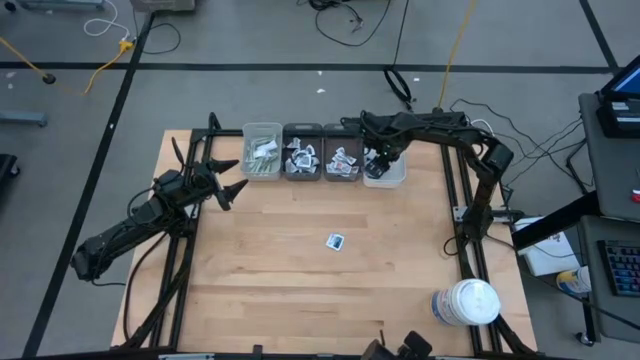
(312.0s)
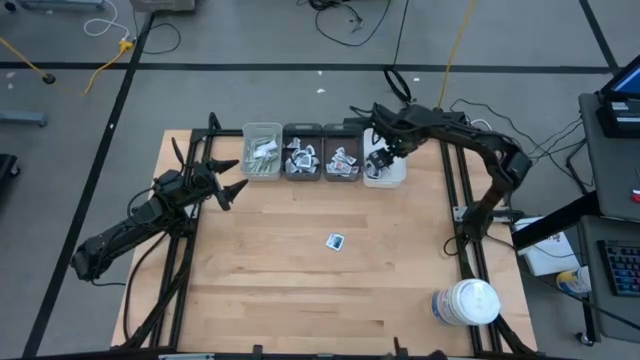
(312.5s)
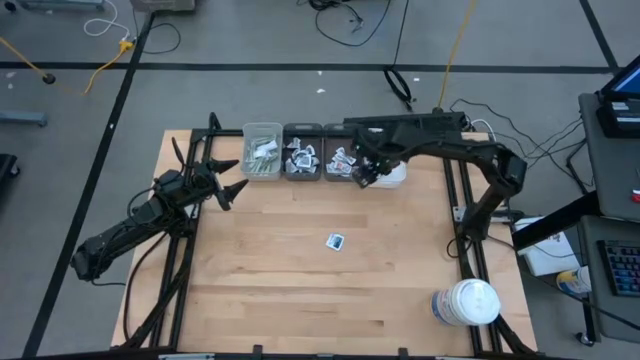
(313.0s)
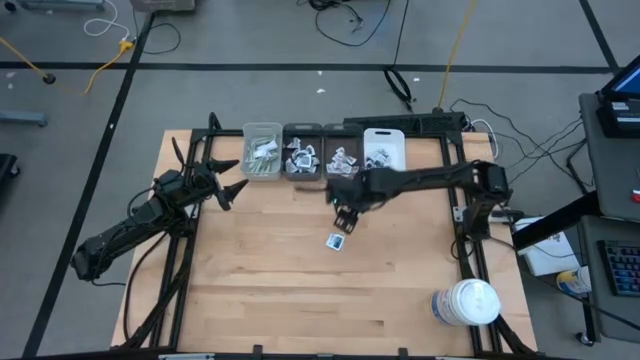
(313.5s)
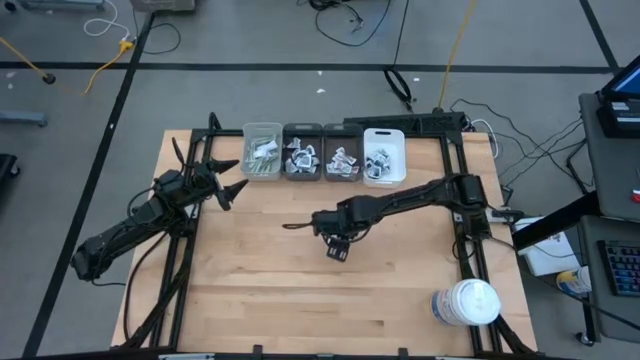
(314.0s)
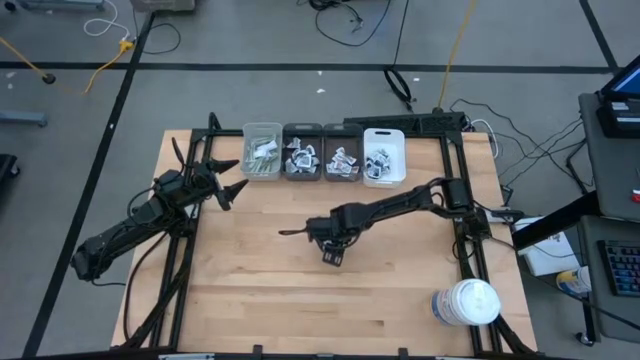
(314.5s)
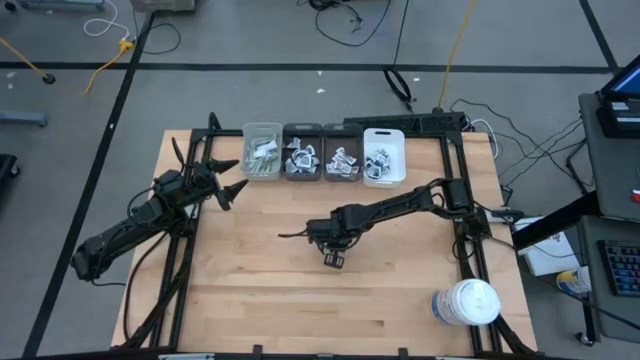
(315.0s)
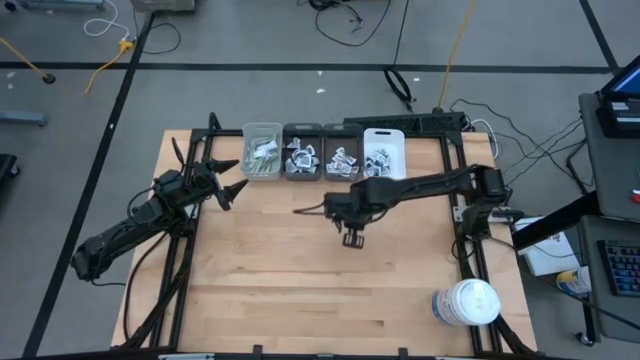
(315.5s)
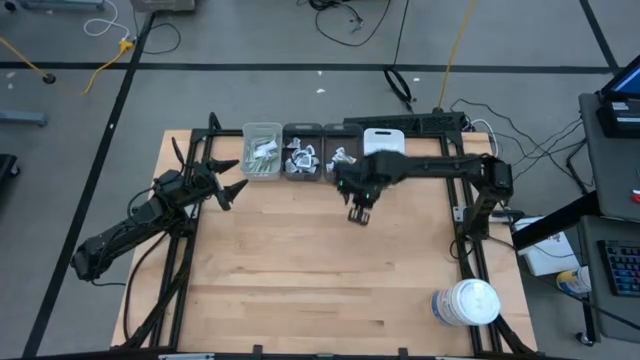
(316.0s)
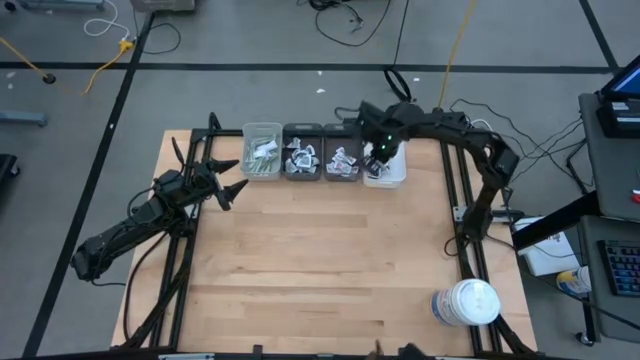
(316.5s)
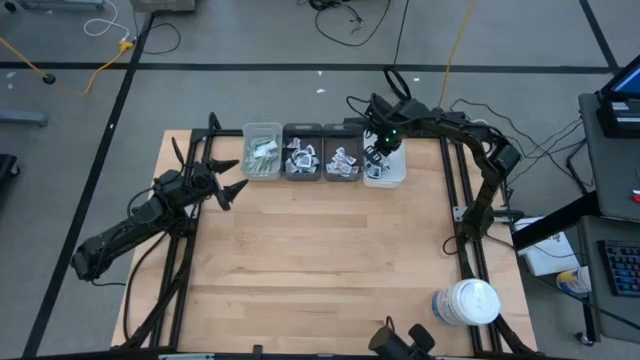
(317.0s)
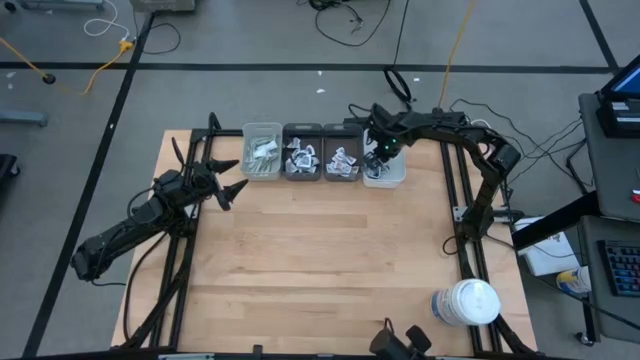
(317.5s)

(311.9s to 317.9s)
Task: Pick & Place First Aid Supplies
Put the alcohol pad into the white bin

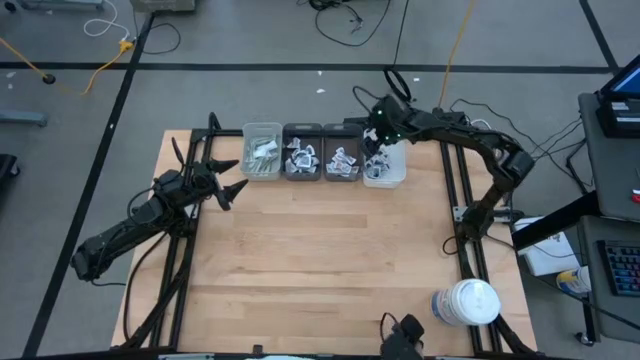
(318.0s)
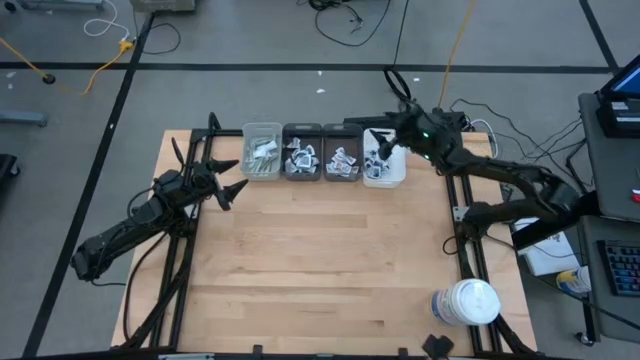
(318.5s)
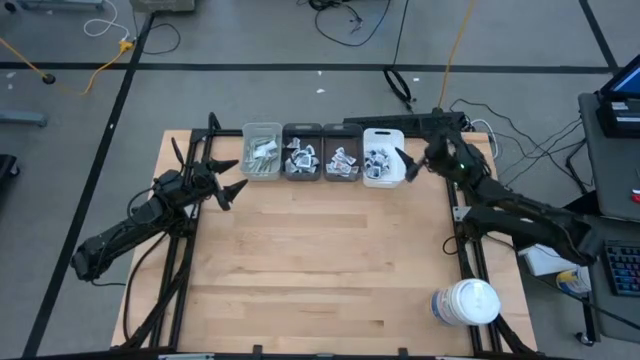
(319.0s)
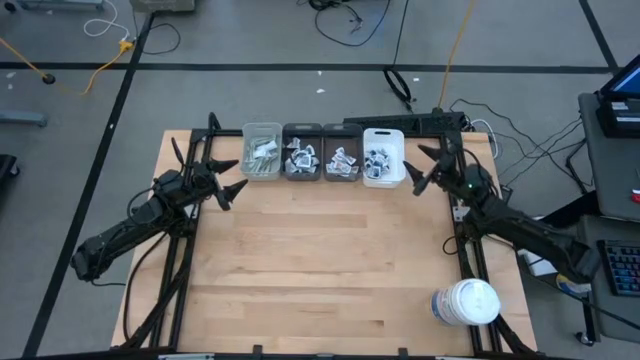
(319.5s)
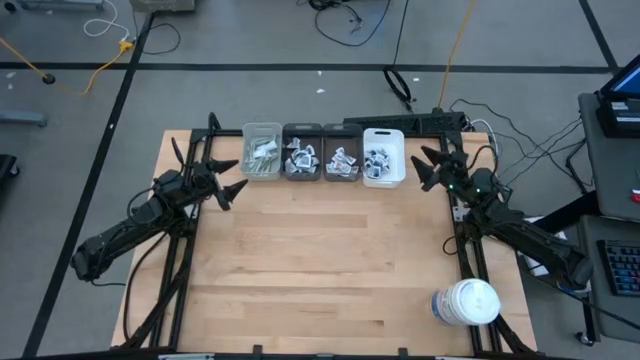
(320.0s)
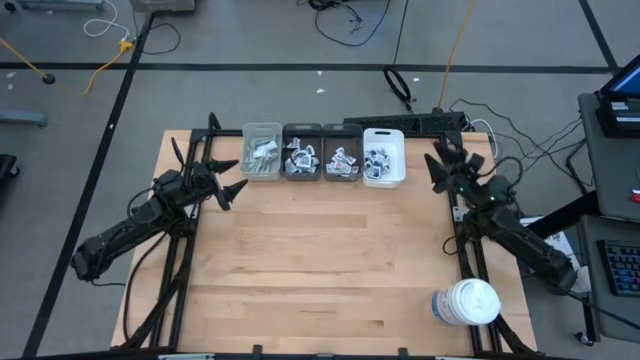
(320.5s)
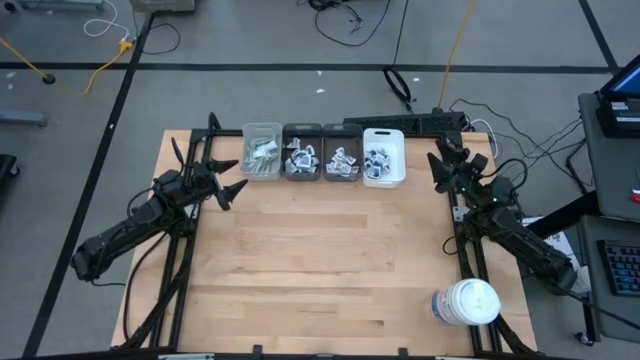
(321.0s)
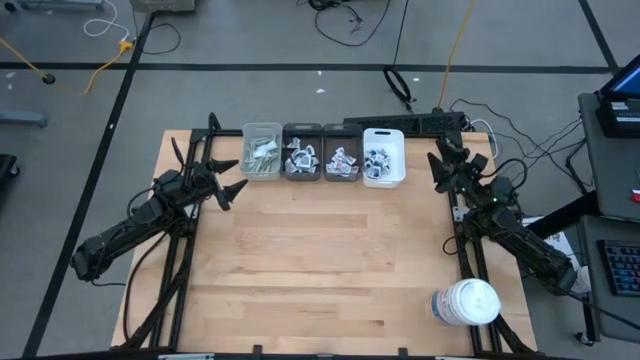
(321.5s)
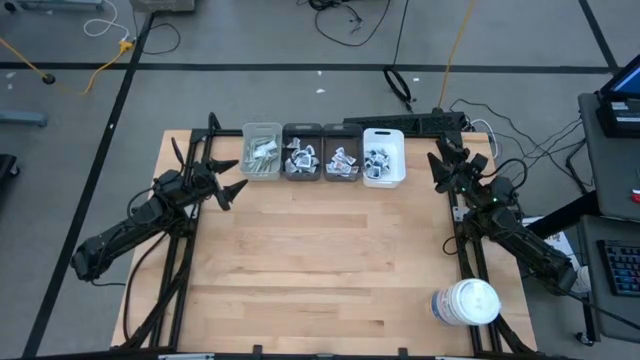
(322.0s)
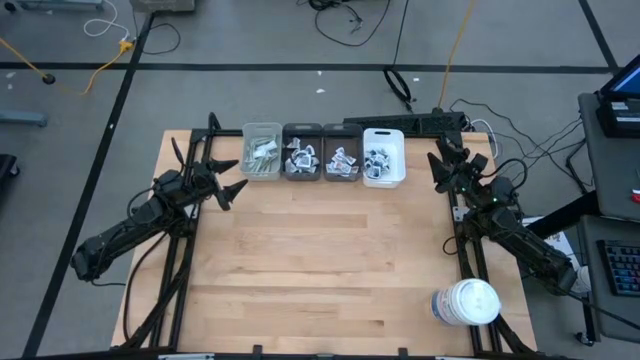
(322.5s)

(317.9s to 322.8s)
Return to Home Position

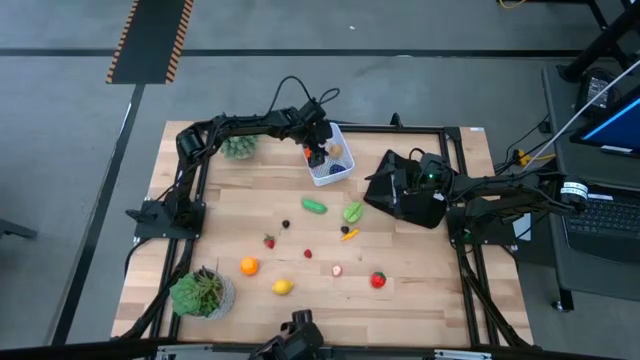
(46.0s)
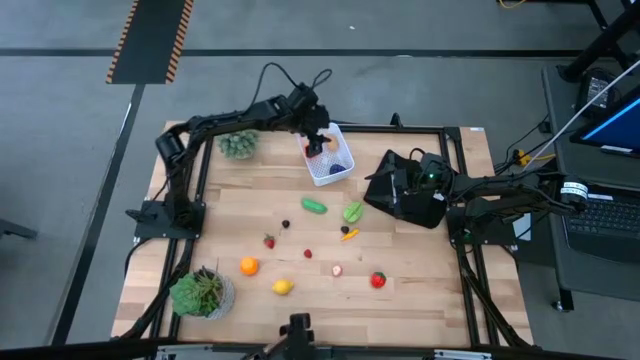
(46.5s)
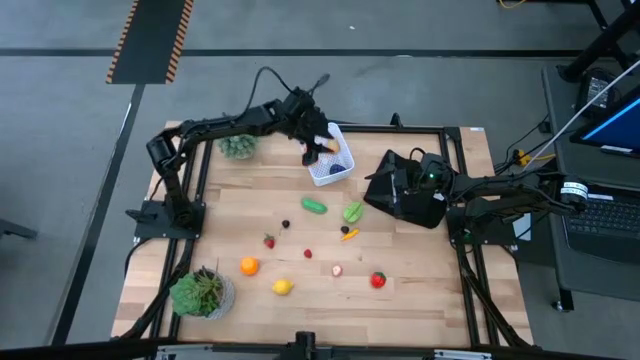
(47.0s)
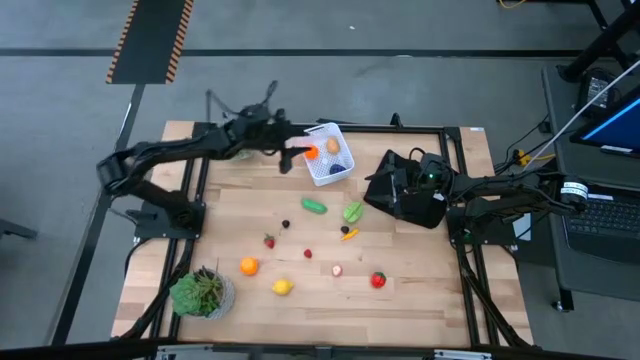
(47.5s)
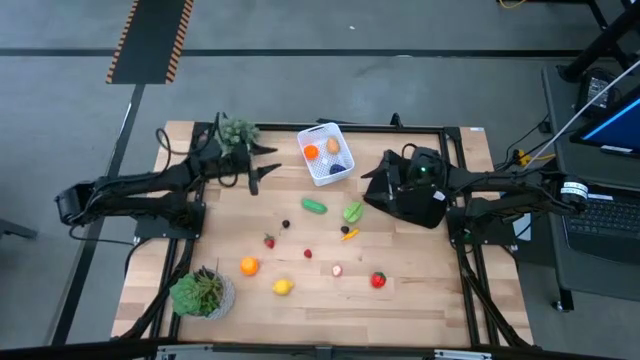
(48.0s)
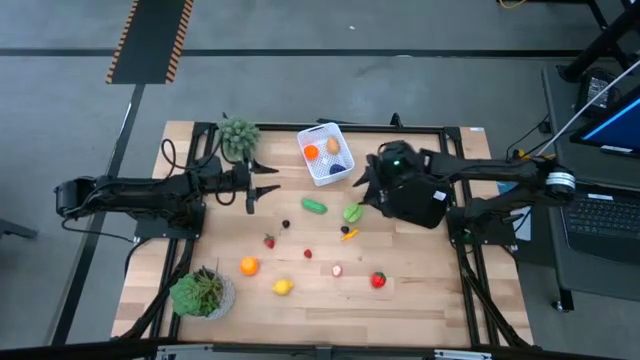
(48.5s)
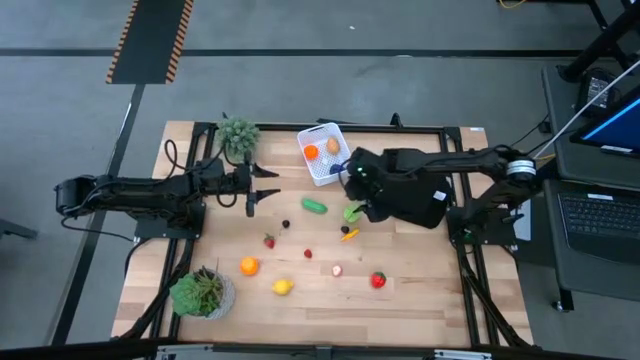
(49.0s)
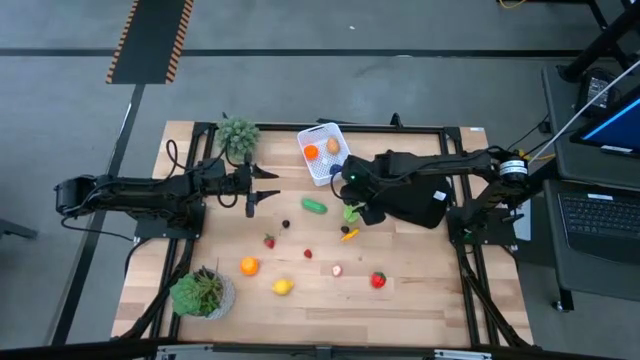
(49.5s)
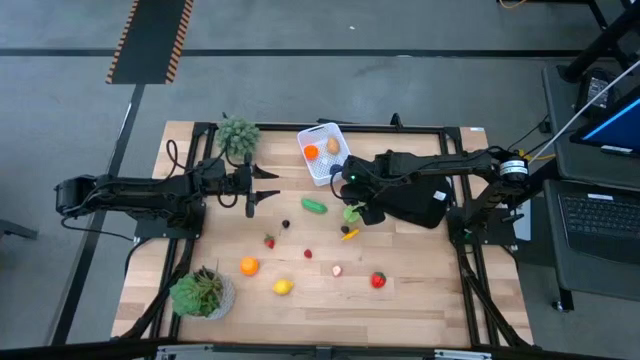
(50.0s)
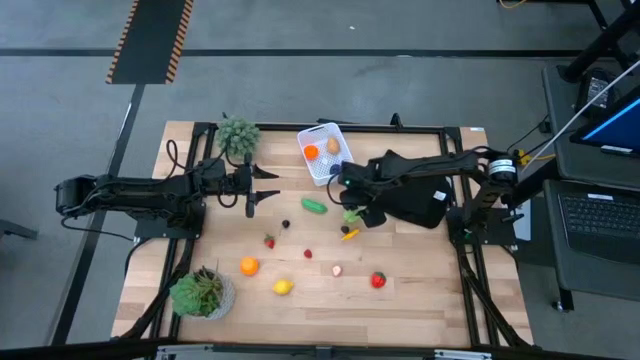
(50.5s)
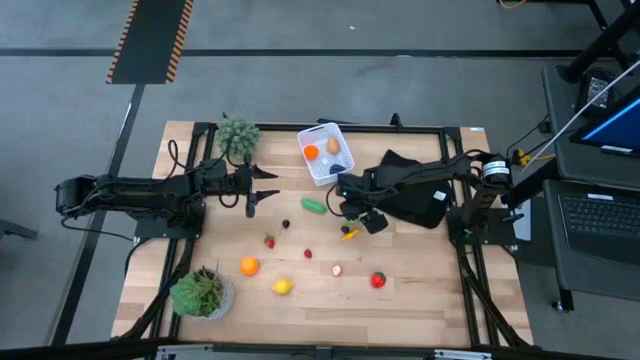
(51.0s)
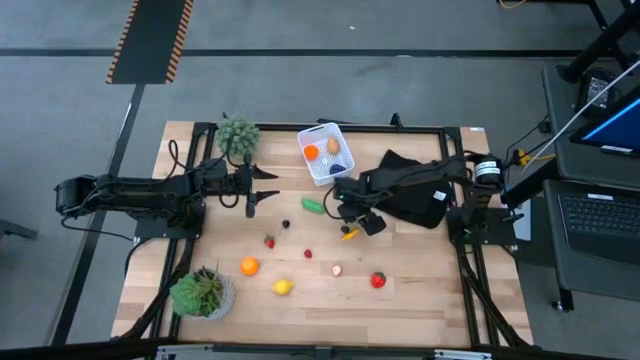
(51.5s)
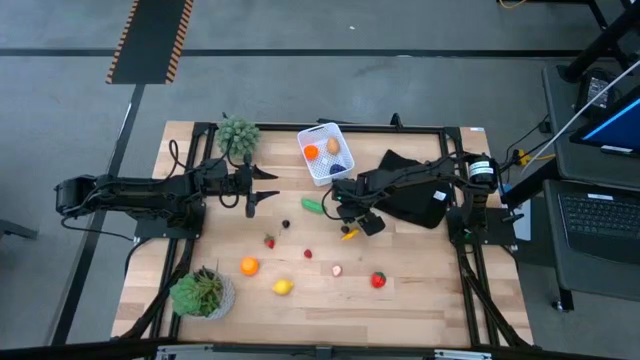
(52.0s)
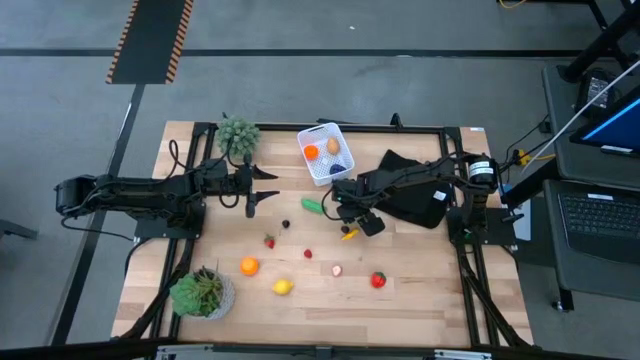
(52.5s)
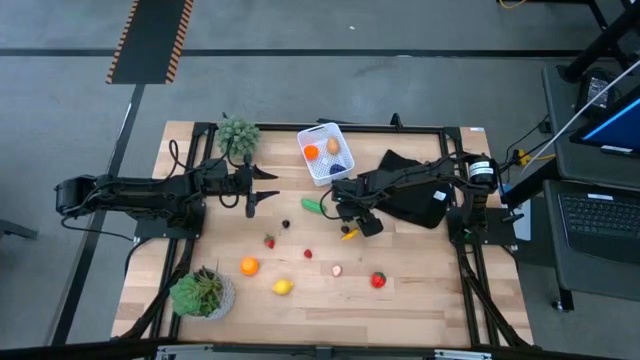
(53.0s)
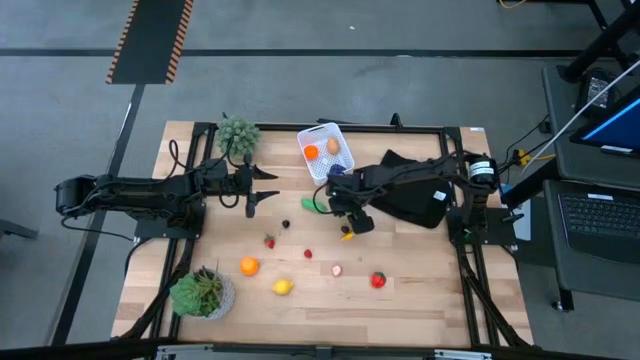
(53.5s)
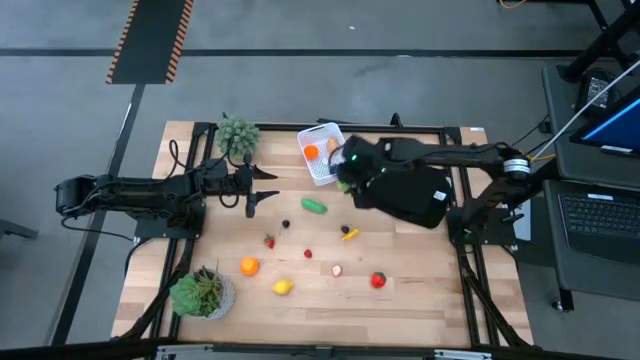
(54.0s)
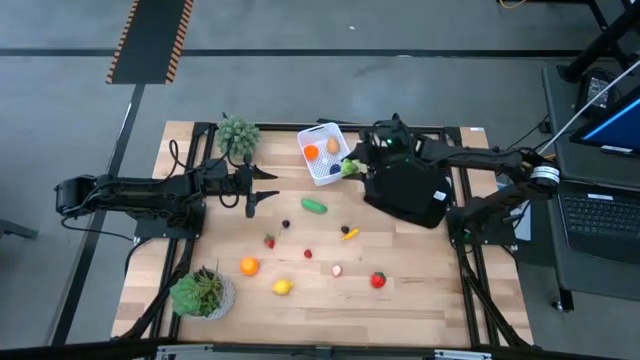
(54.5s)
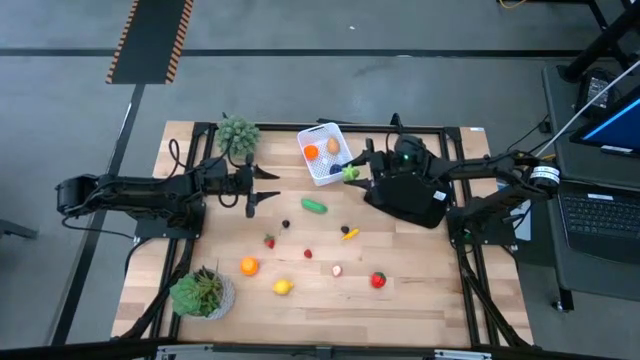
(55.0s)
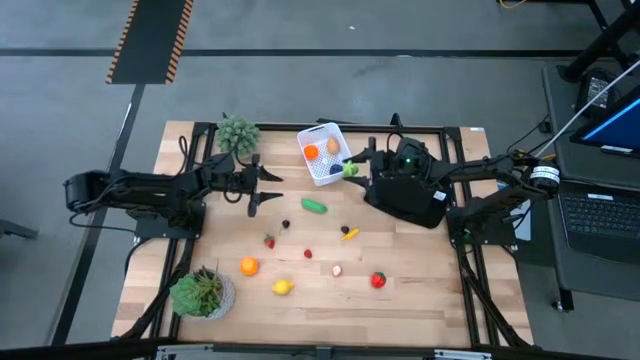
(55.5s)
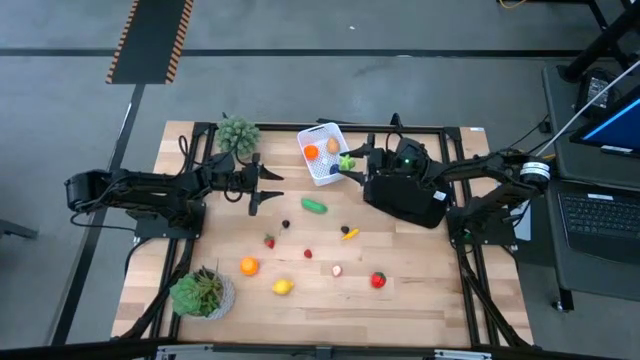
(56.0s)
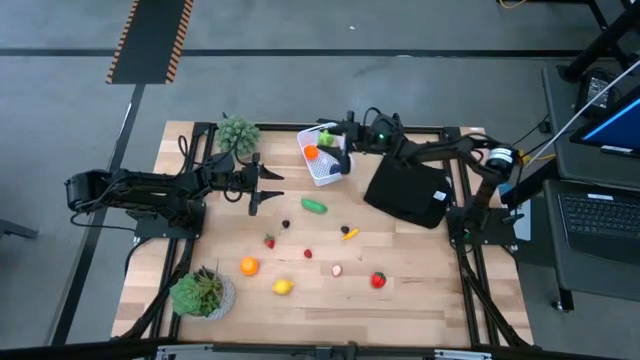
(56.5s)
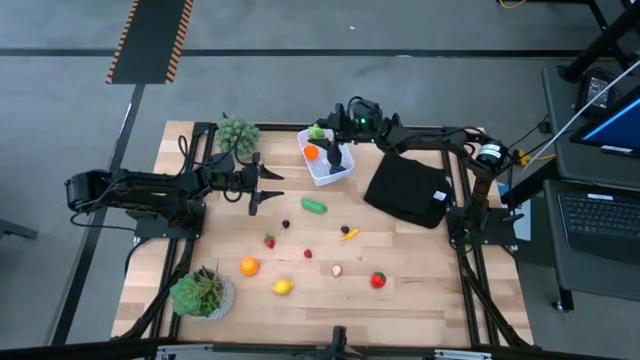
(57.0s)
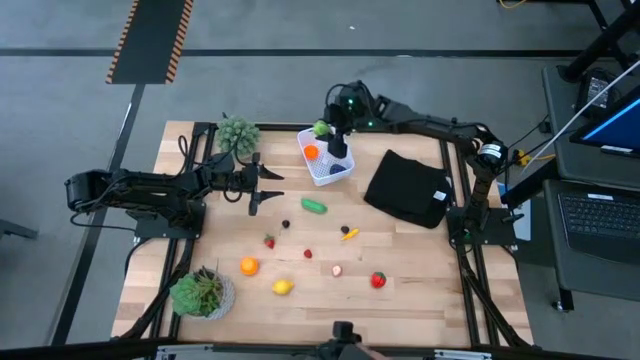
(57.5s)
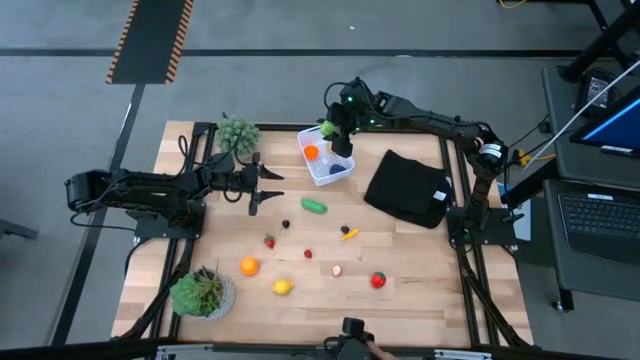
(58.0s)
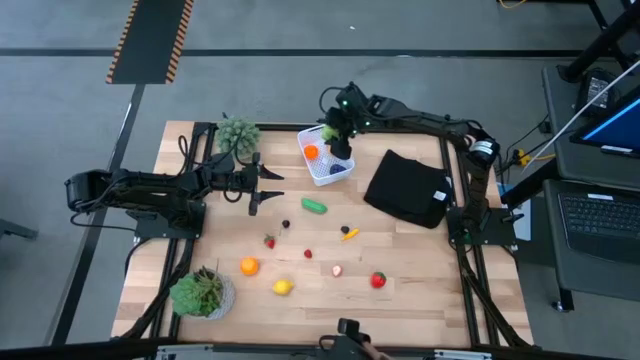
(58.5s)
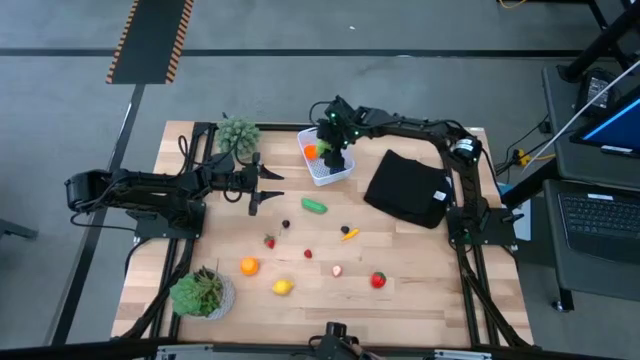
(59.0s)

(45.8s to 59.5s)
Task: Pick and placing Produce into tupperware
Put the starfruit into the basket
